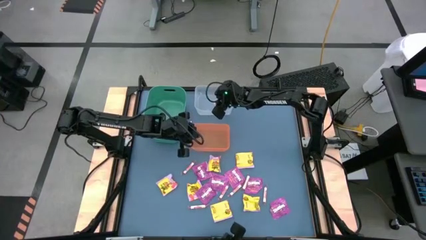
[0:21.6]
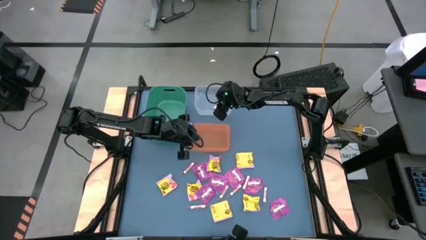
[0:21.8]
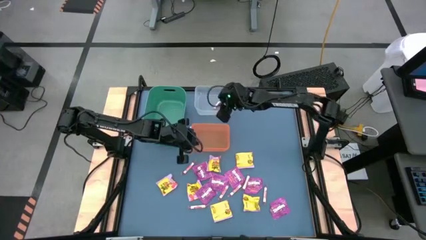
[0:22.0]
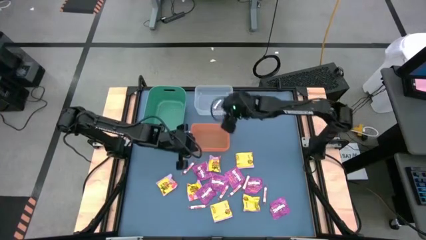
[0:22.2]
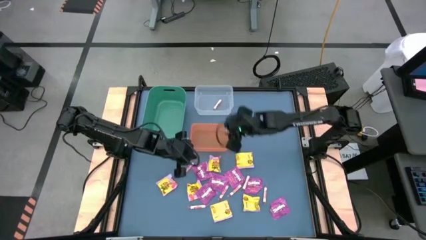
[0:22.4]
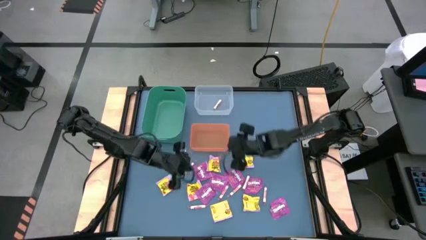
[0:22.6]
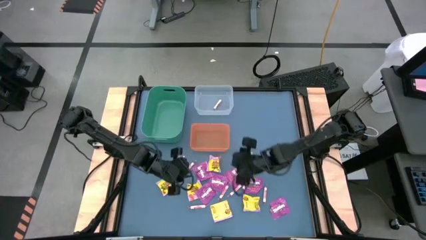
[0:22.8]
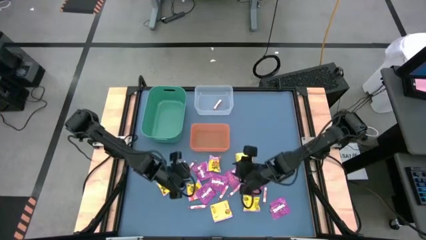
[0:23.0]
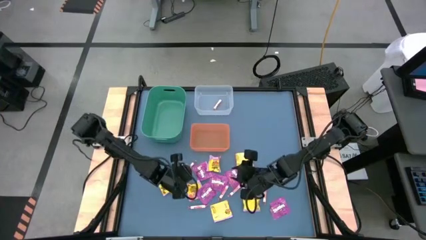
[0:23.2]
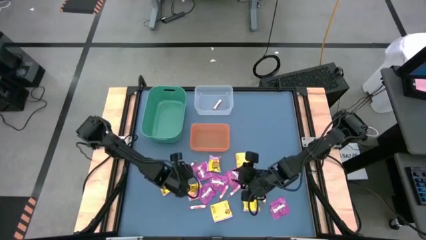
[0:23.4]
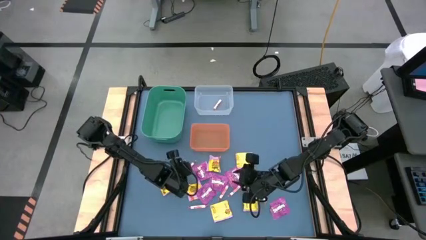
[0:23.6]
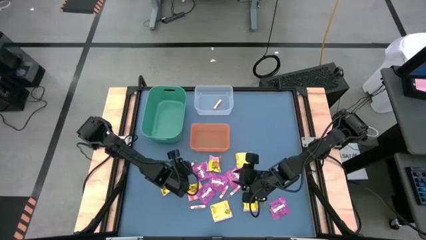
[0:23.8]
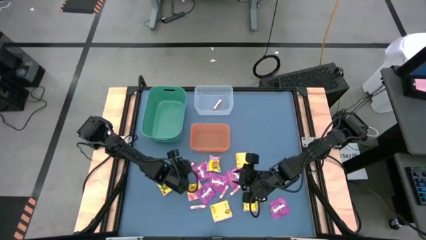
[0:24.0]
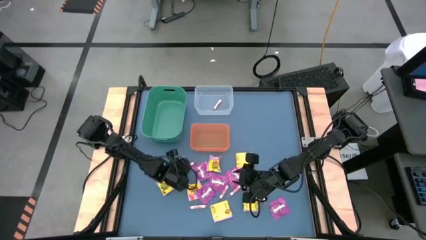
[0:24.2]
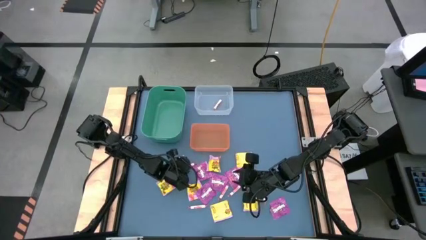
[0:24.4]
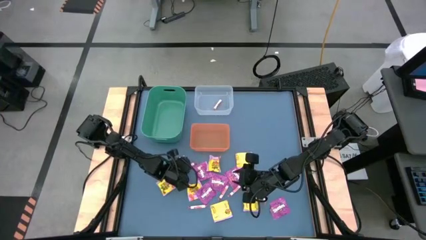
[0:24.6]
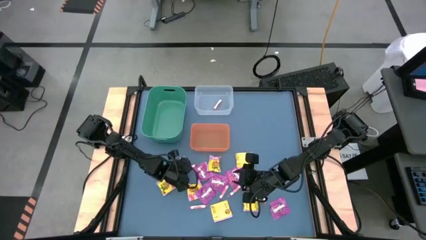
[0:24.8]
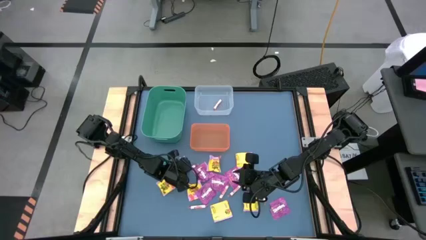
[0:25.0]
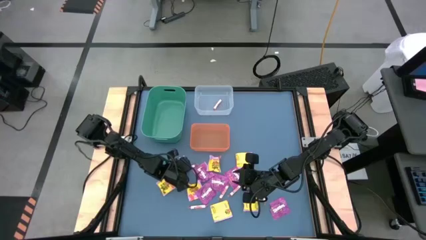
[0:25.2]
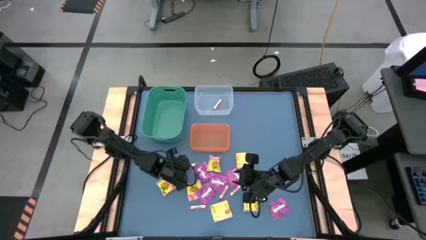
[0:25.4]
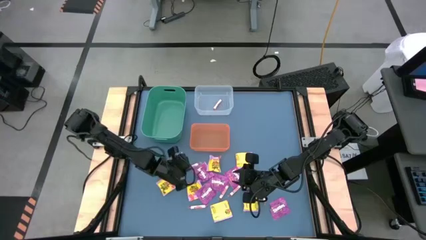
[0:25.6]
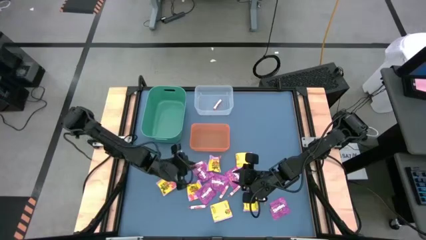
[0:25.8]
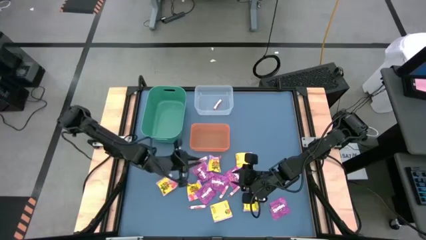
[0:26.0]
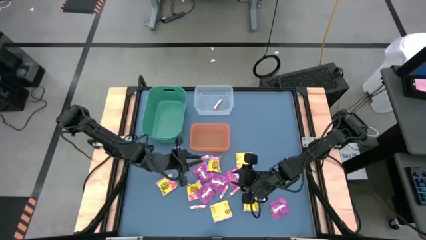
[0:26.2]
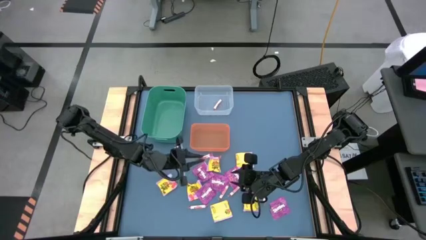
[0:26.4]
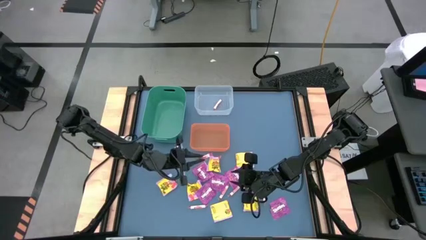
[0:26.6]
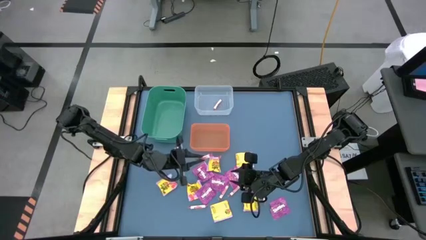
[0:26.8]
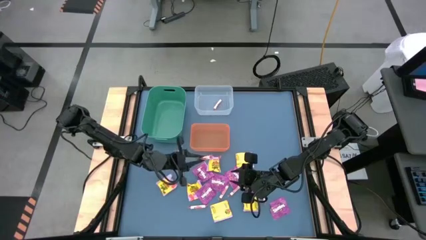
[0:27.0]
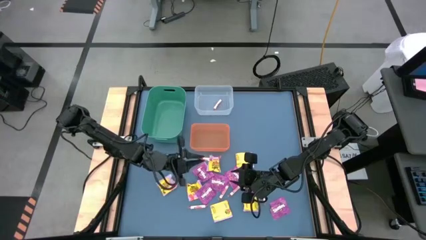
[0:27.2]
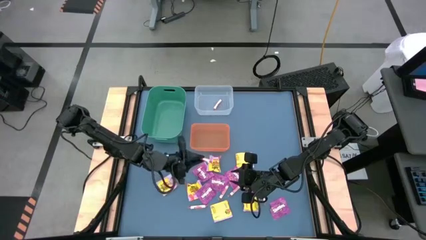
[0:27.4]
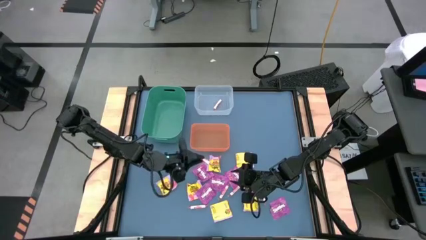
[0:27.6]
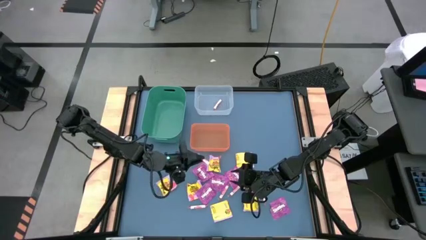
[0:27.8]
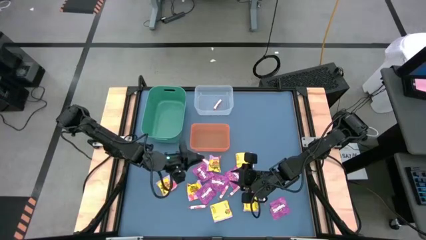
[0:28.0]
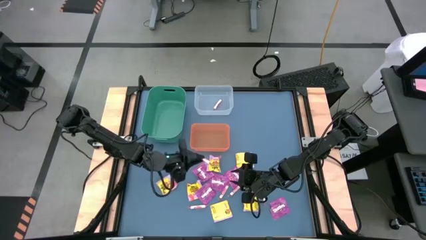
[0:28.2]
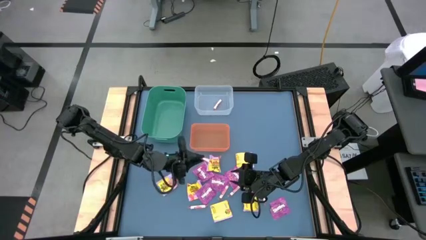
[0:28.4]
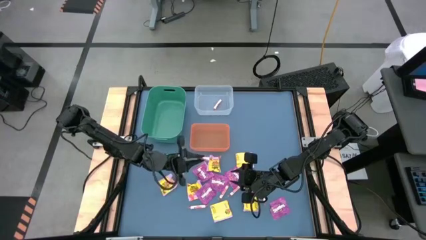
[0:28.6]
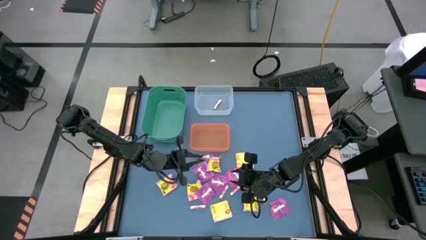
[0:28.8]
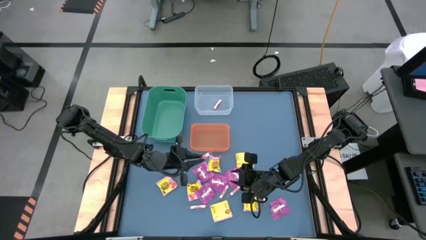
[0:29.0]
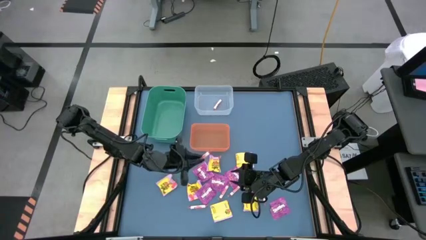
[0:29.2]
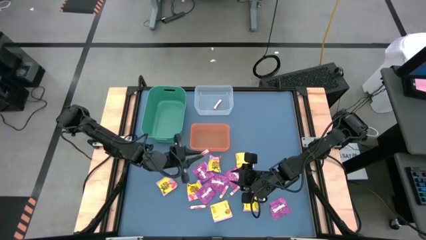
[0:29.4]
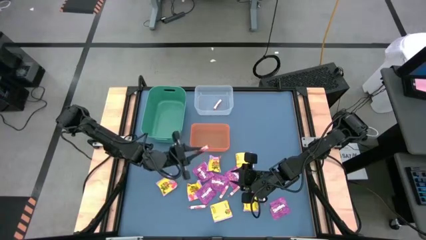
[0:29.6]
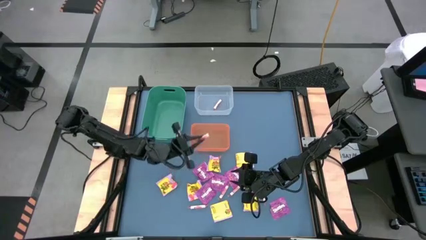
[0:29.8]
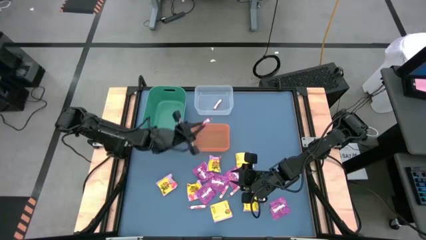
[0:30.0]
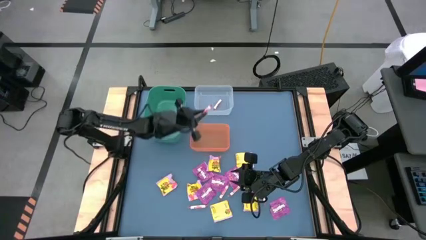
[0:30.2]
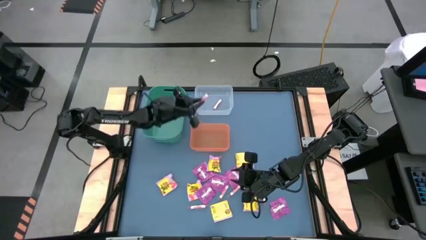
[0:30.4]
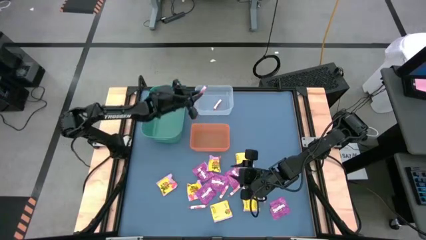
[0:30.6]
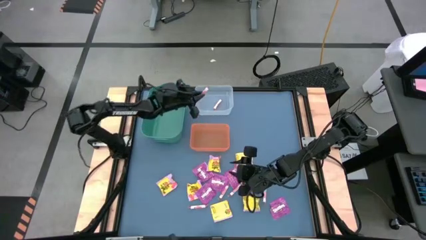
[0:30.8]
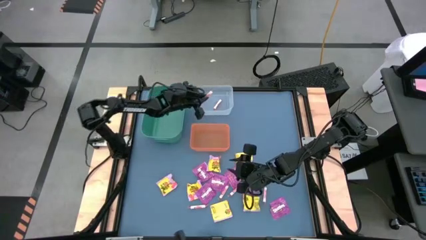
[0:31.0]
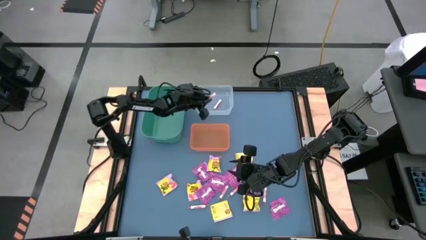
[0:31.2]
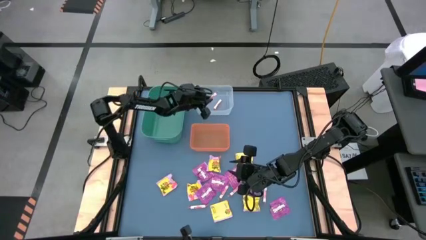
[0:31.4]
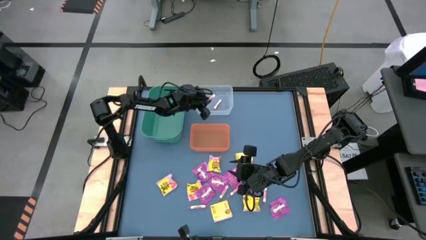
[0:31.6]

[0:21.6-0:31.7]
Task: Sort candy
Put the white candy into the transparent bin
